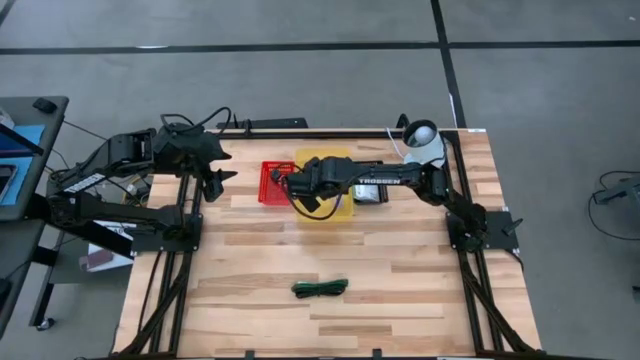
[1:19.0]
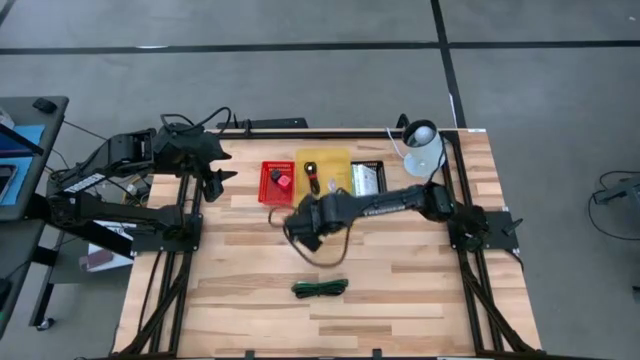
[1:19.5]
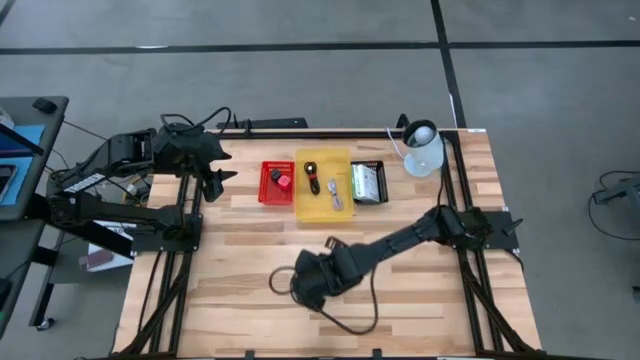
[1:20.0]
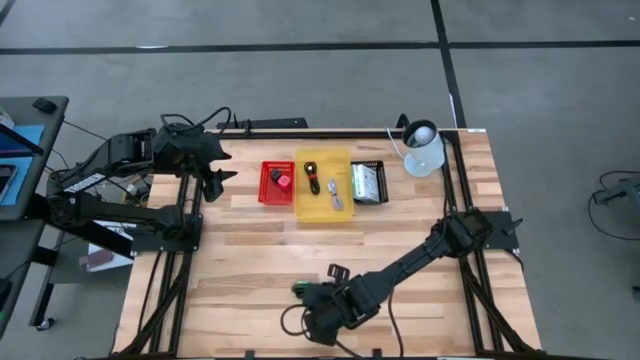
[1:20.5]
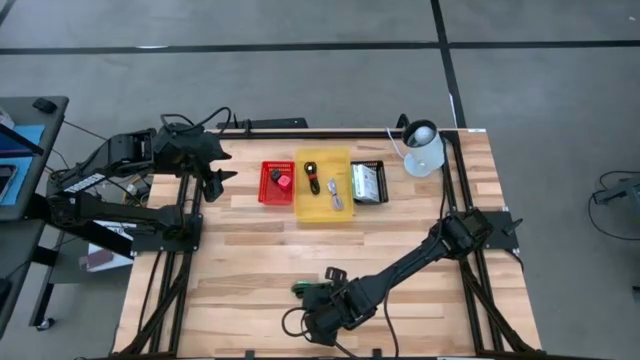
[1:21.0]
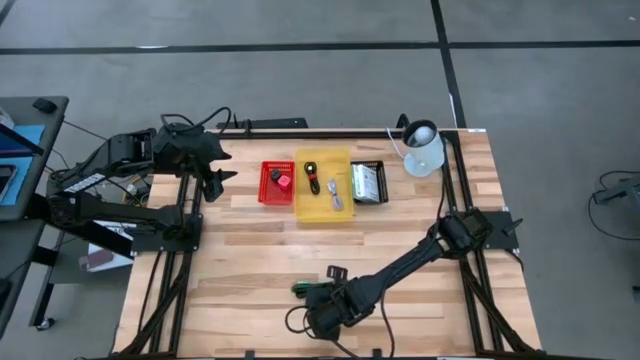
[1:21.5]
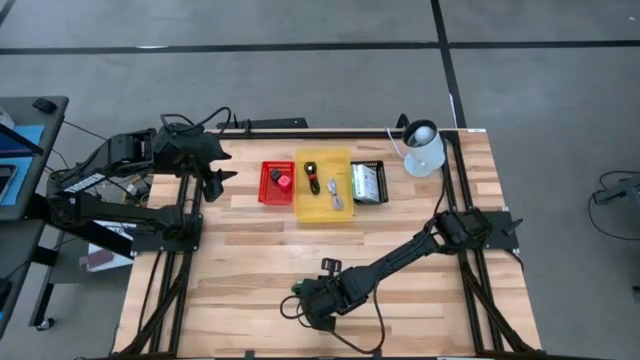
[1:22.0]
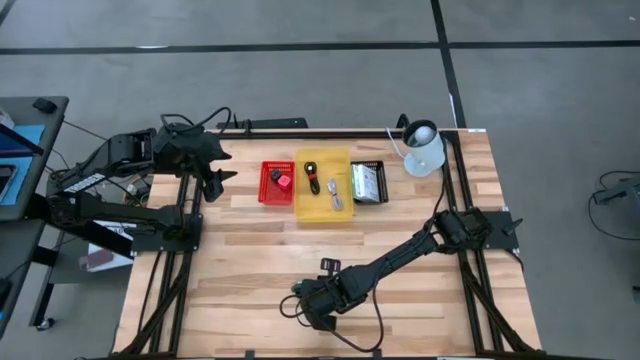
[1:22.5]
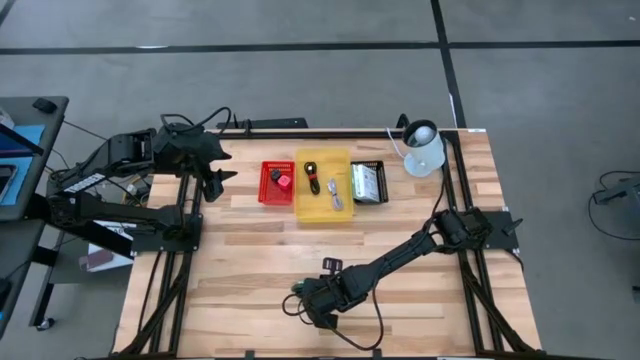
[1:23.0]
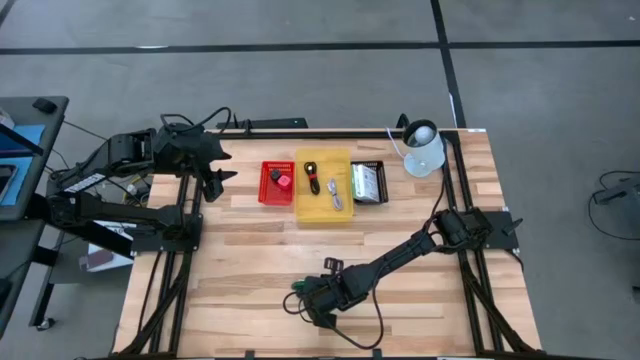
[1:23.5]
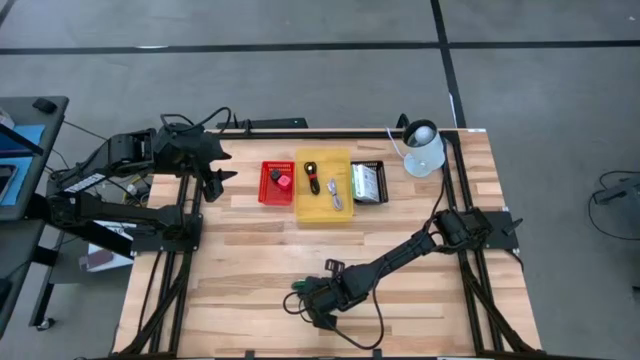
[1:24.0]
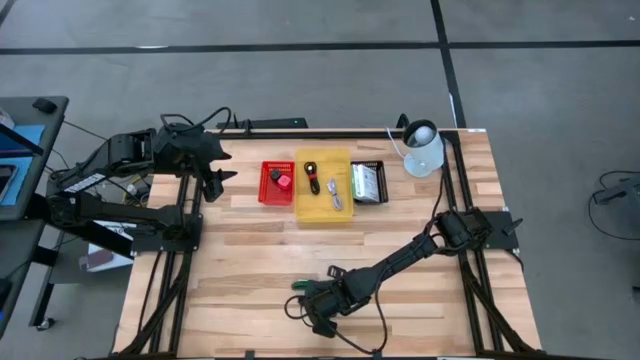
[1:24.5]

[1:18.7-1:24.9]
Task: Pick and place items into bin
Put the black USB cable into the yellow bin

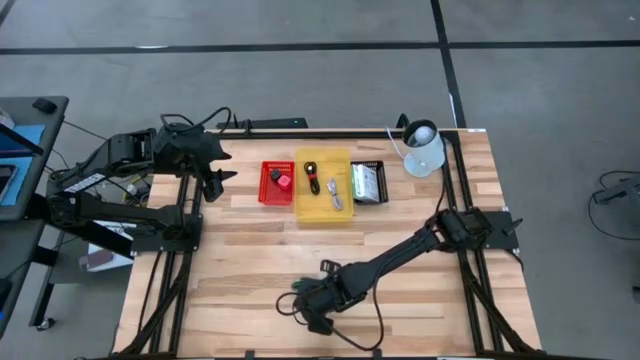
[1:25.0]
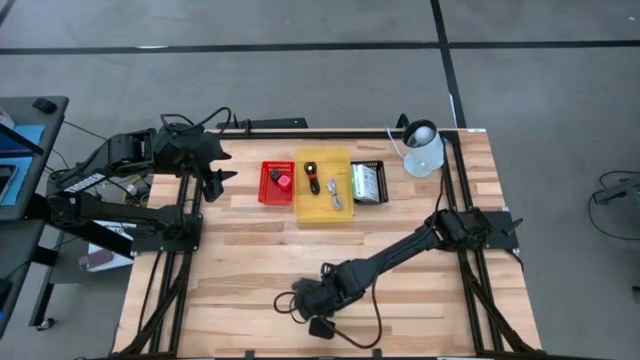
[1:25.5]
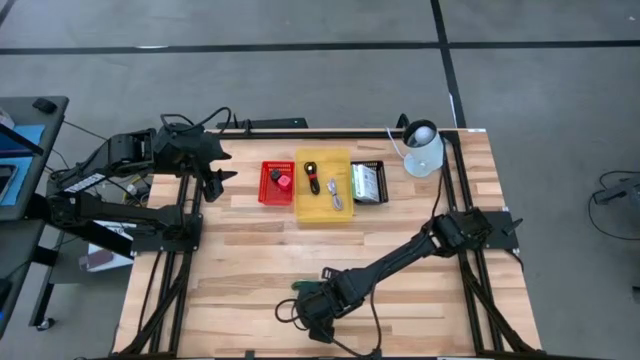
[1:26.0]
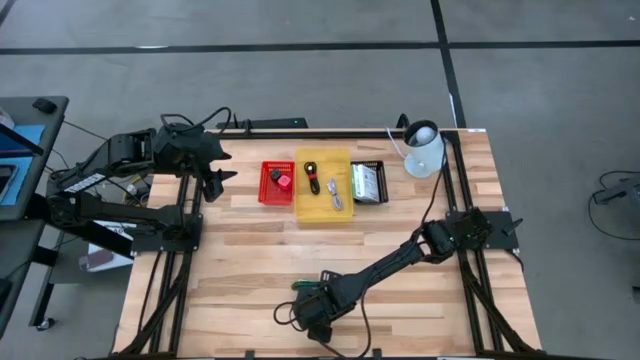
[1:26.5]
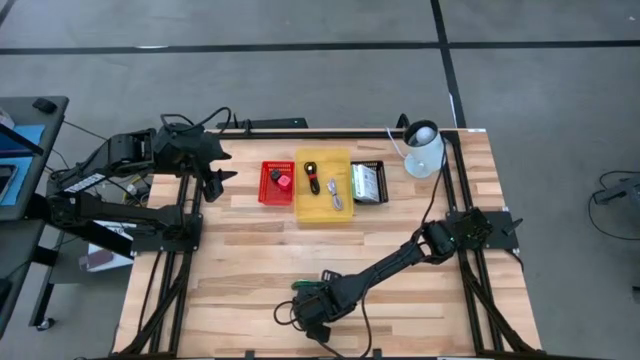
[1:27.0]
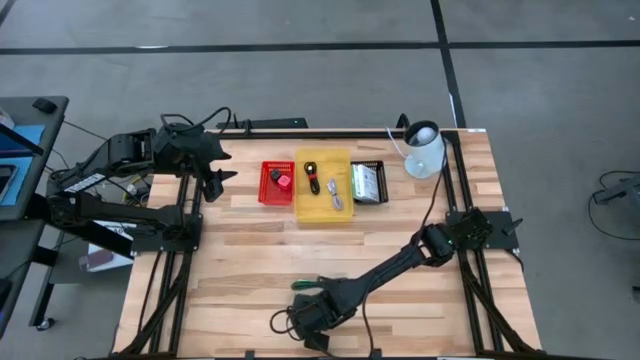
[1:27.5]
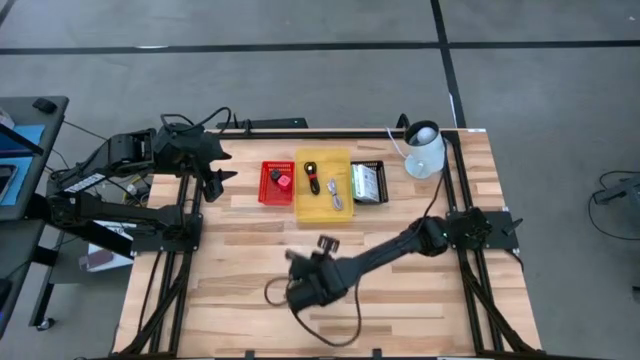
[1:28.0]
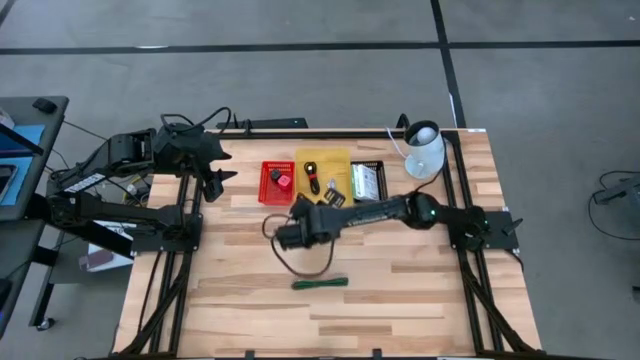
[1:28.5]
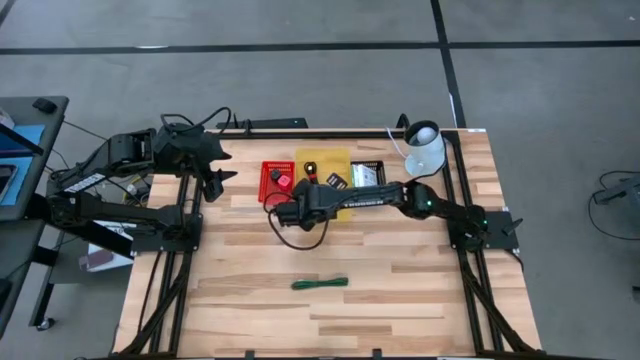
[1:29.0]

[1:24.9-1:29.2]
Put the top black USB cable into the yellow bin

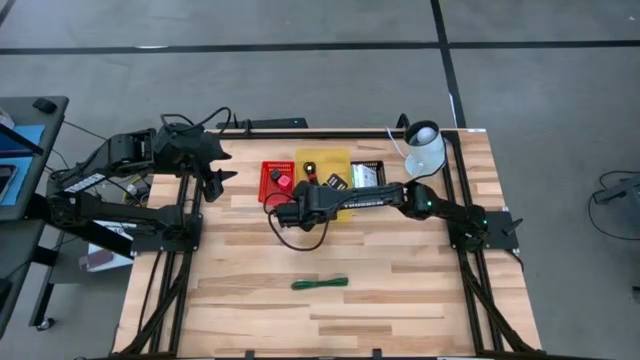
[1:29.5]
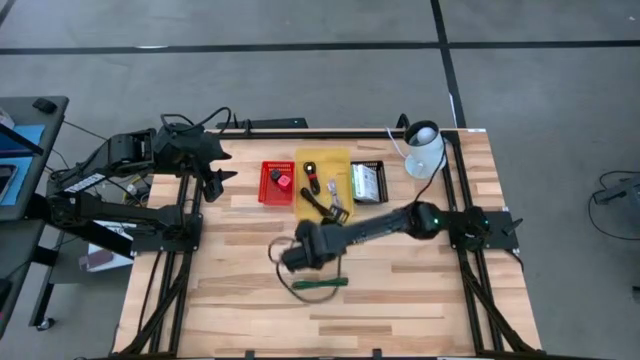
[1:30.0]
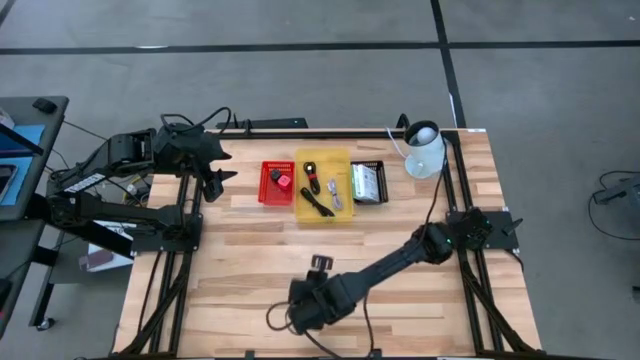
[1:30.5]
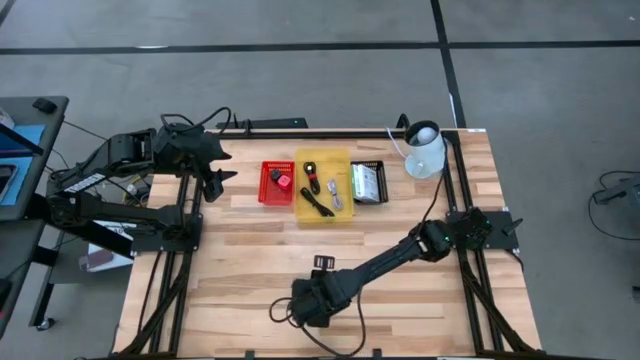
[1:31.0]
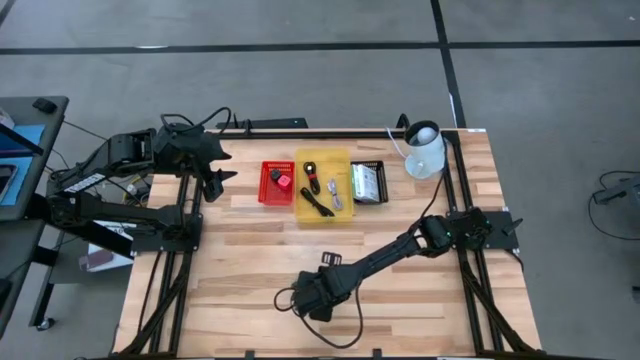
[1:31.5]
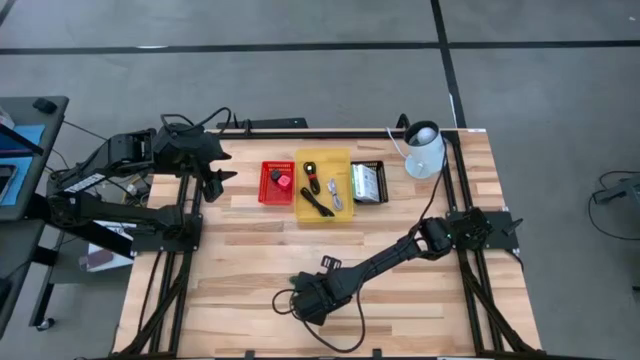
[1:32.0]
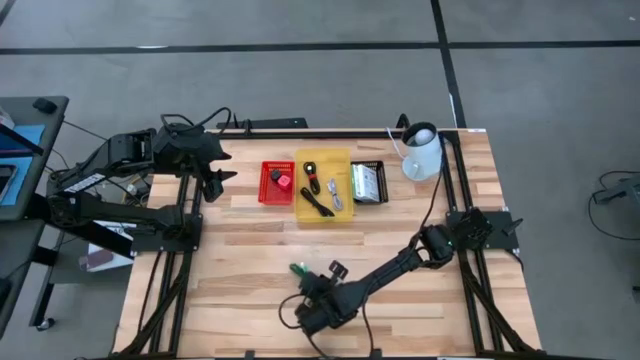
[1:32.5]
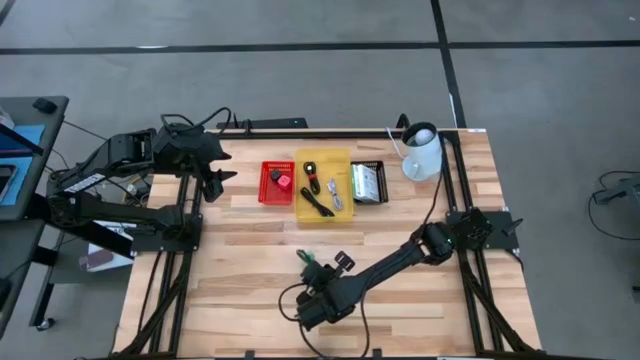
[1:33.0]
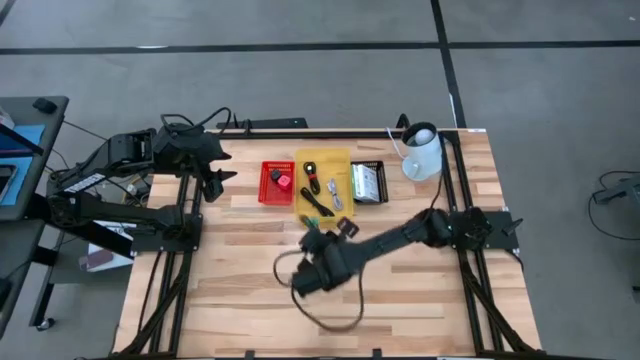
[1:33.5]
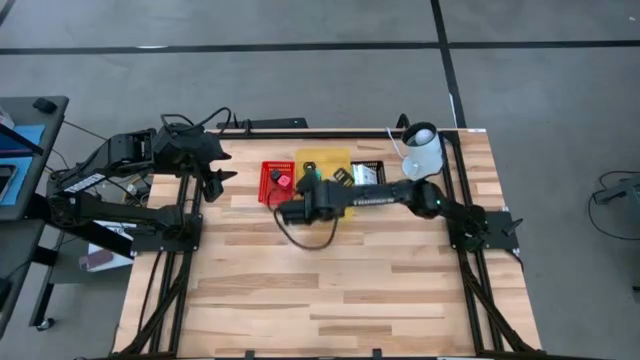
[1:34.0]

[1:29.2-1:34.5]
Put the green USB cable into the yellow bin

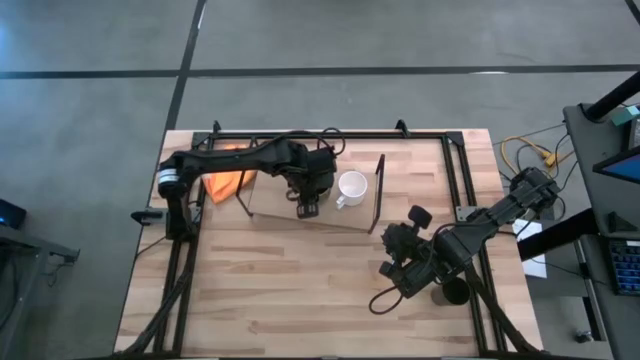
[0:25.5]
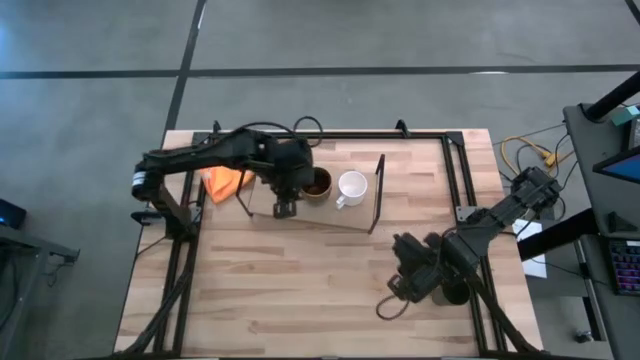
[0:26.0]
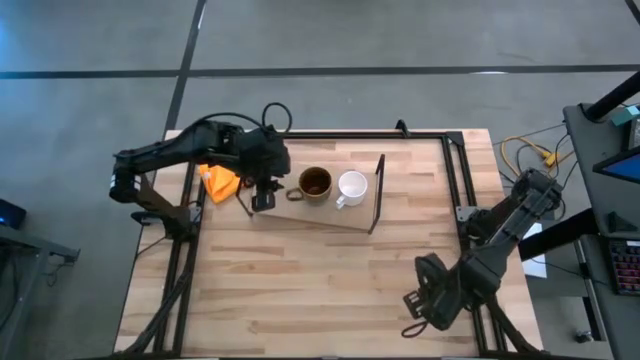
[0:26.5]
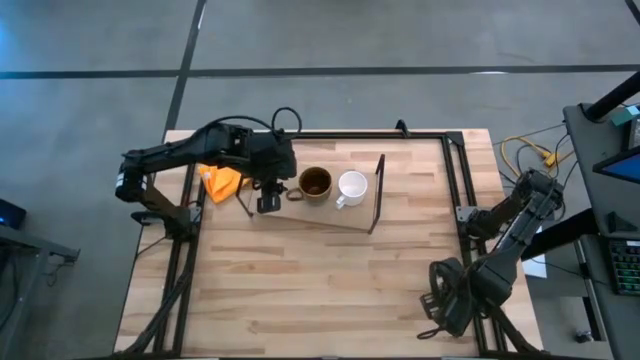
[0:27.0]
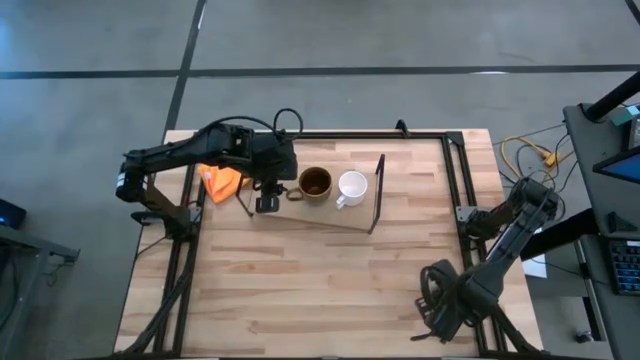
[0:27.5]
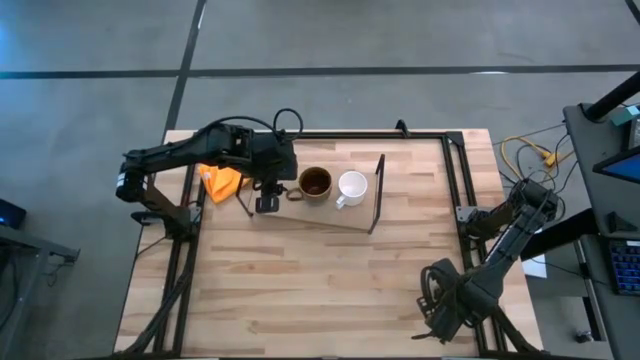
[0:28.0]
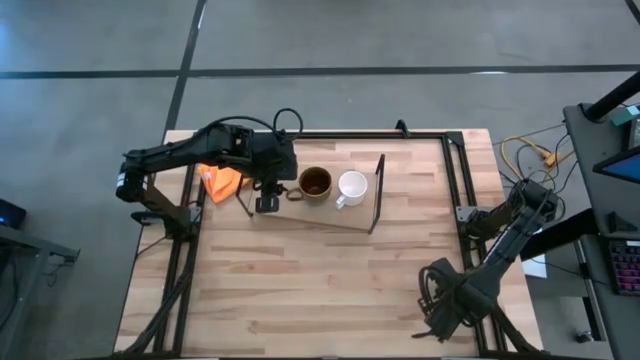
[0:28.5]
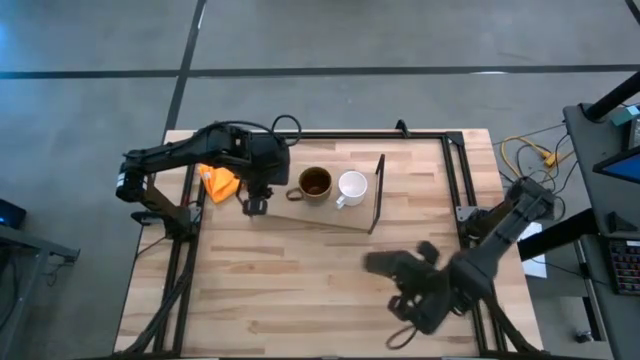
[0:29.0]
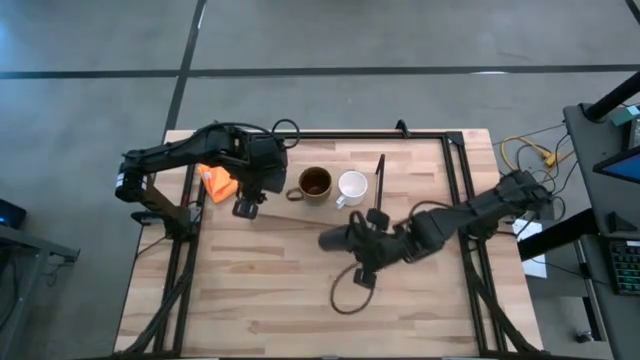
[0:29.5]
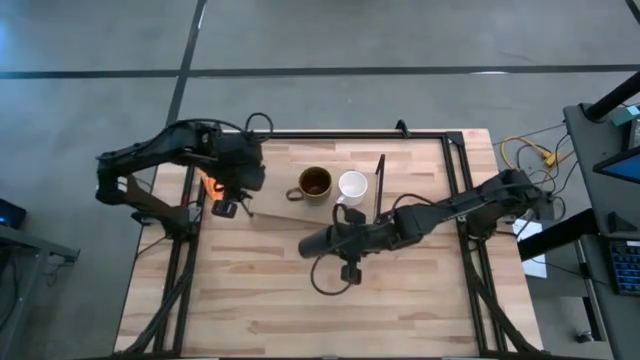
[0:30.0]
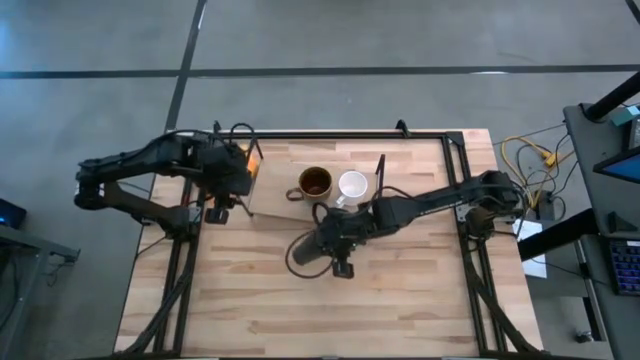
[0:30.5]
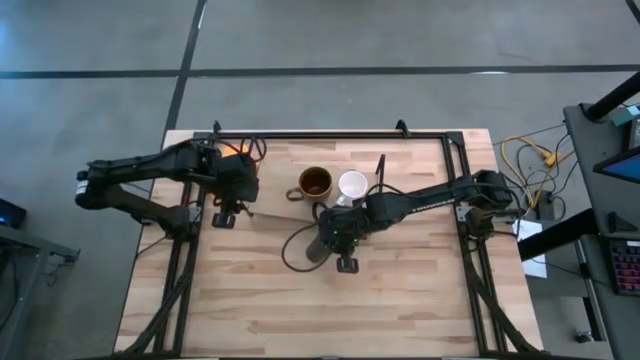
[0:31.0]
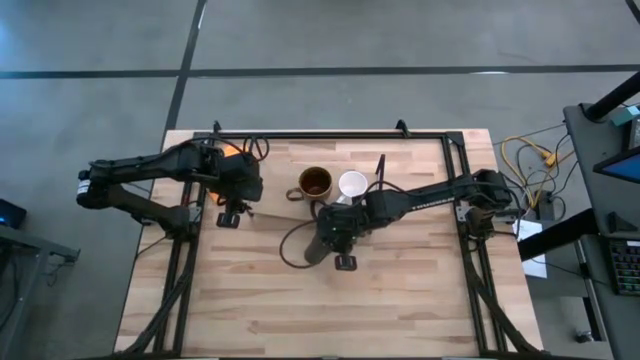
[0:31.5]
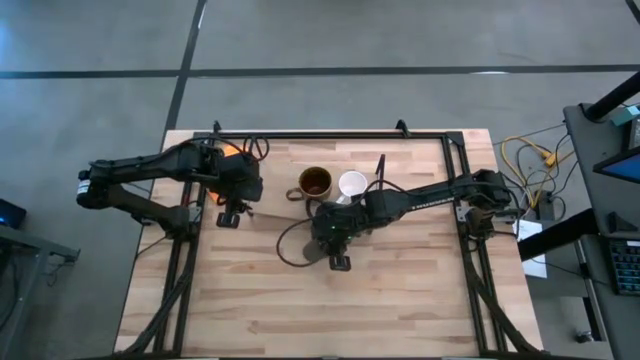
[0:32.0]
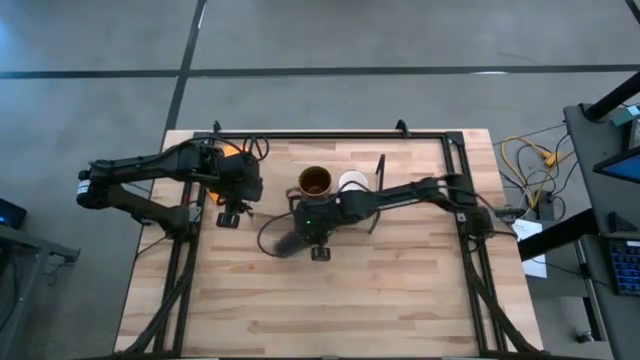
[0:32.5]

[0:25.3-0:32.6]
Task: Stack small to large cups/mugs on shelf
Put the black cup on the shelf
